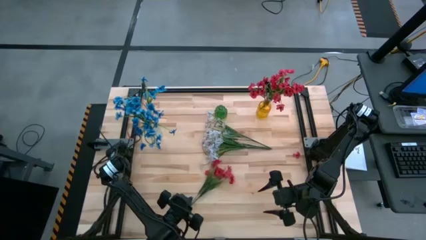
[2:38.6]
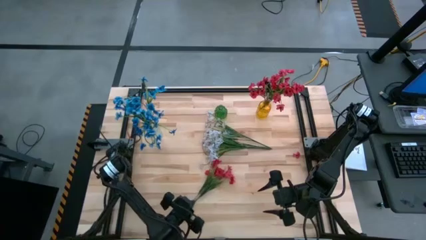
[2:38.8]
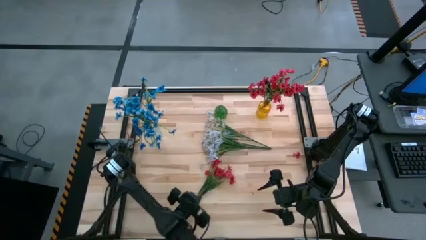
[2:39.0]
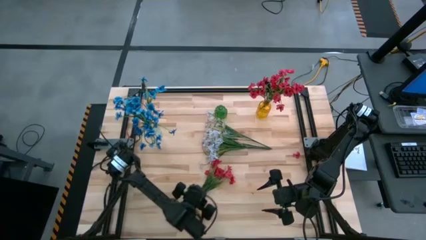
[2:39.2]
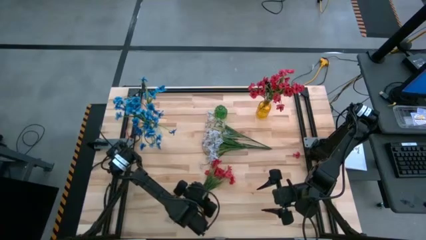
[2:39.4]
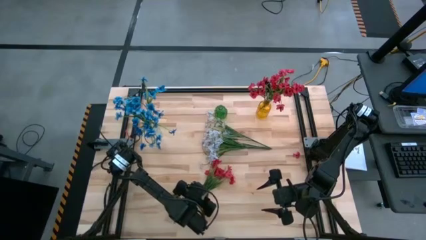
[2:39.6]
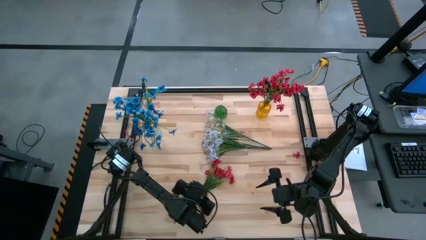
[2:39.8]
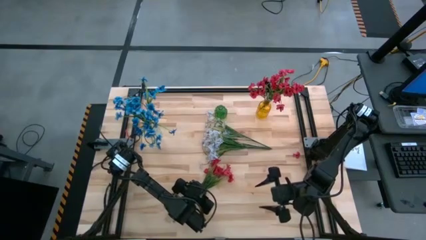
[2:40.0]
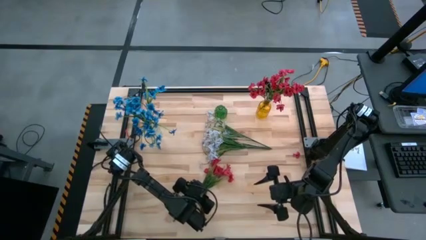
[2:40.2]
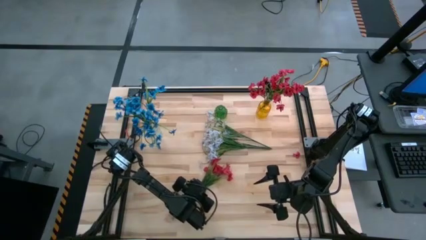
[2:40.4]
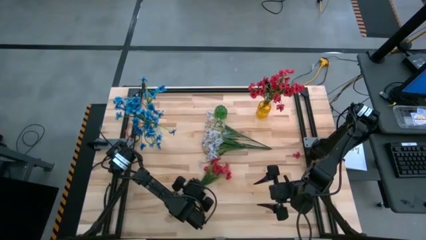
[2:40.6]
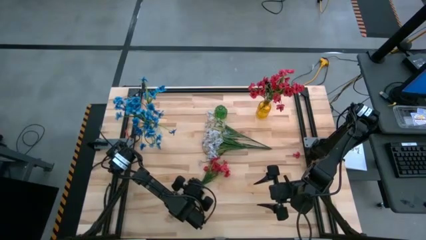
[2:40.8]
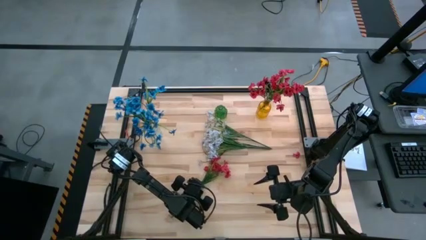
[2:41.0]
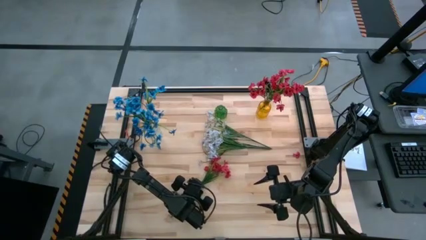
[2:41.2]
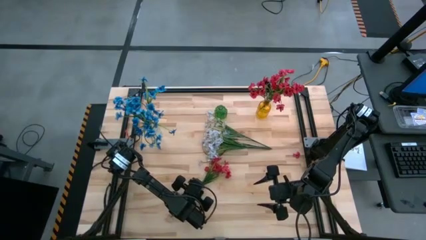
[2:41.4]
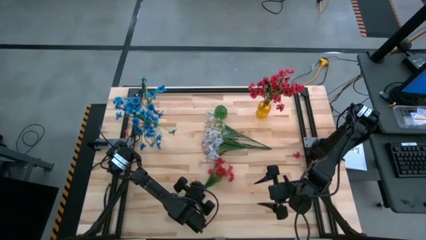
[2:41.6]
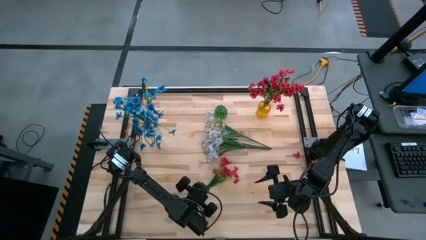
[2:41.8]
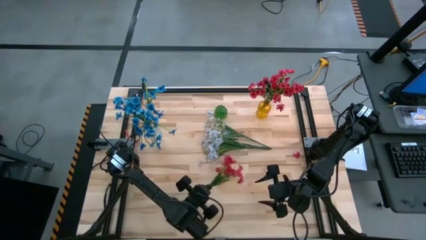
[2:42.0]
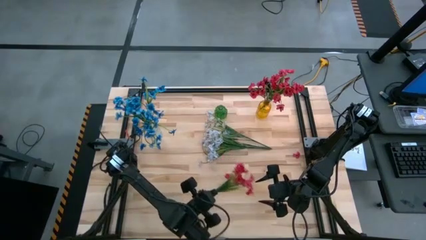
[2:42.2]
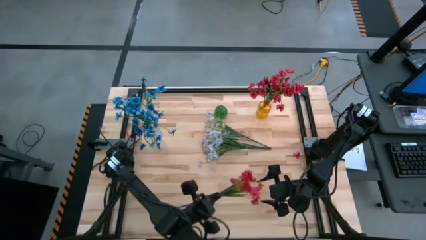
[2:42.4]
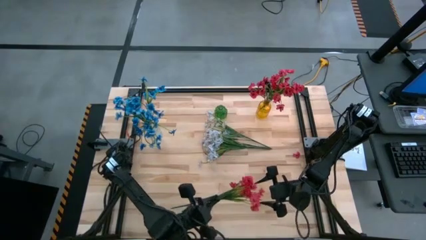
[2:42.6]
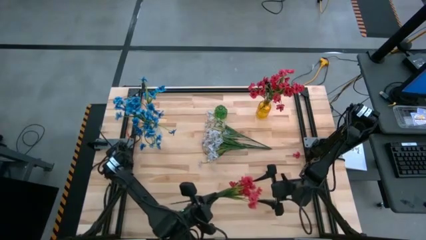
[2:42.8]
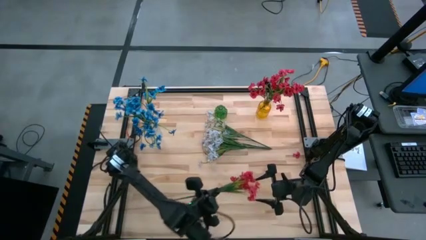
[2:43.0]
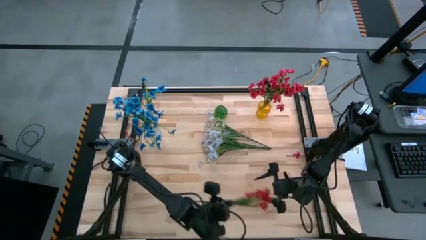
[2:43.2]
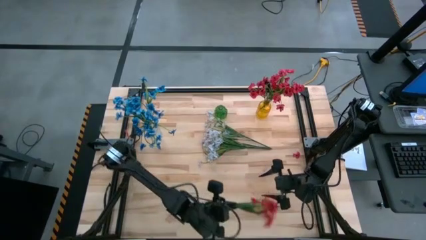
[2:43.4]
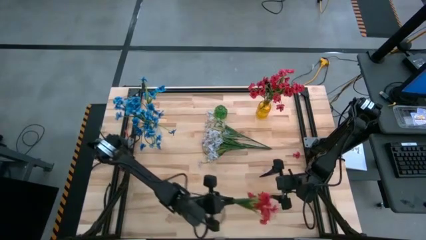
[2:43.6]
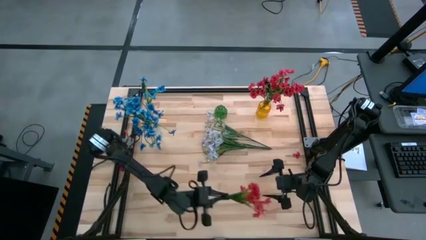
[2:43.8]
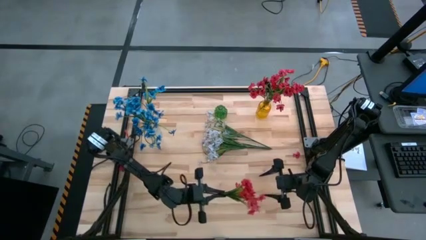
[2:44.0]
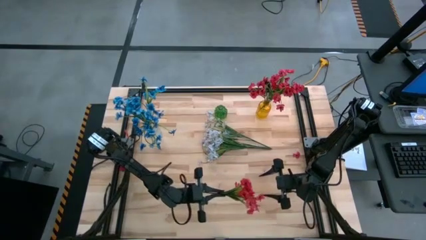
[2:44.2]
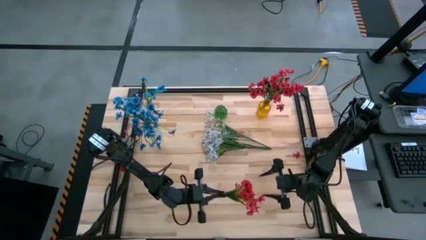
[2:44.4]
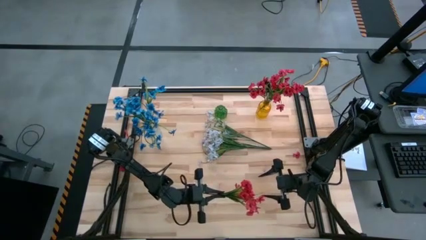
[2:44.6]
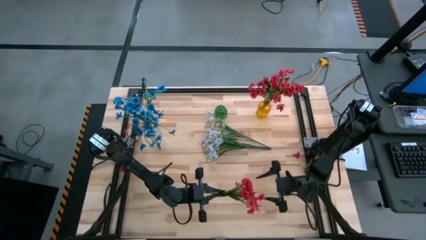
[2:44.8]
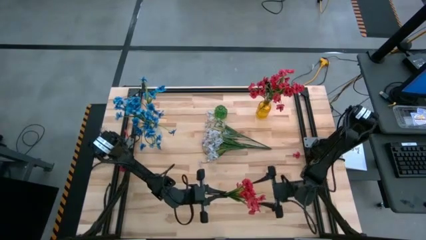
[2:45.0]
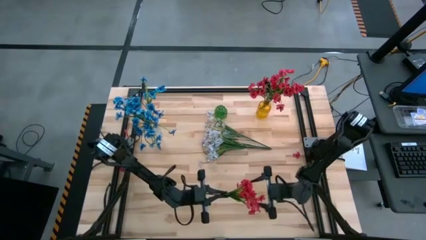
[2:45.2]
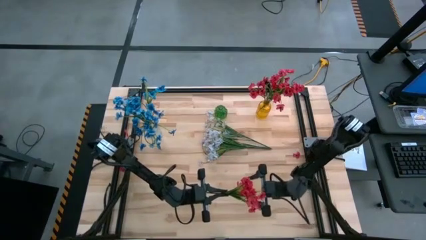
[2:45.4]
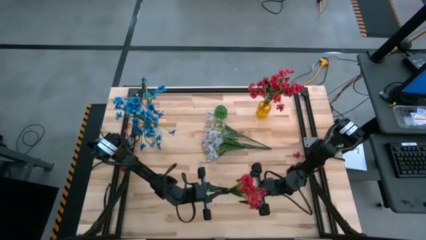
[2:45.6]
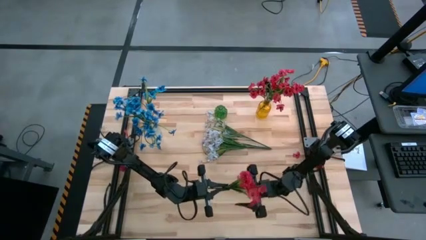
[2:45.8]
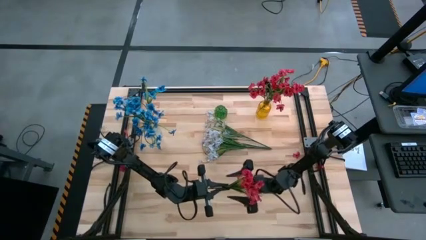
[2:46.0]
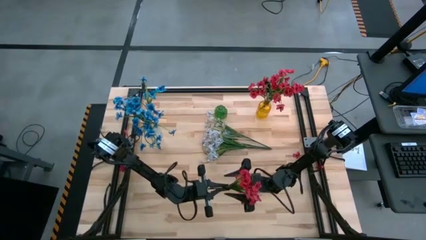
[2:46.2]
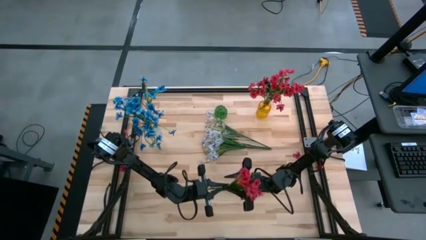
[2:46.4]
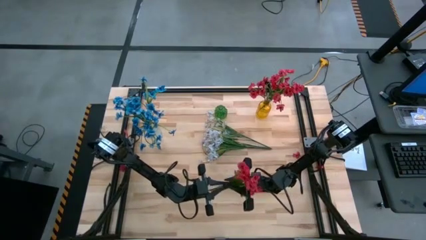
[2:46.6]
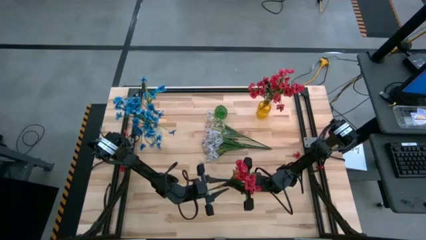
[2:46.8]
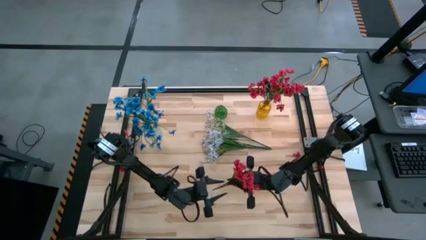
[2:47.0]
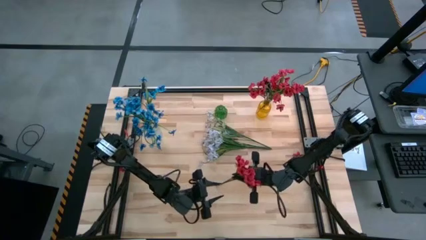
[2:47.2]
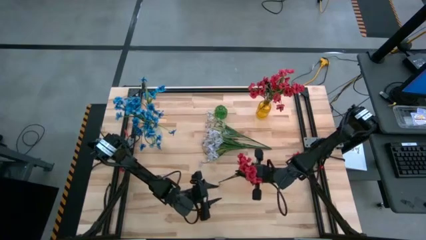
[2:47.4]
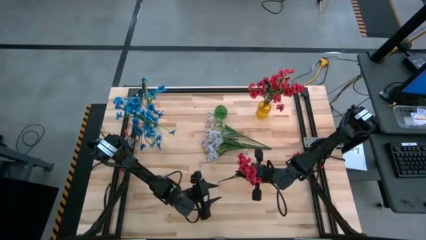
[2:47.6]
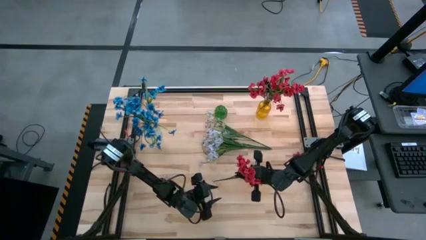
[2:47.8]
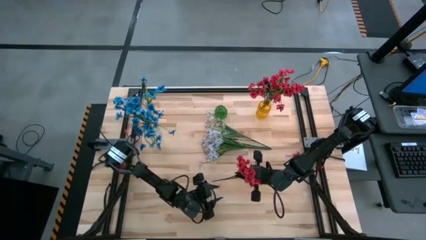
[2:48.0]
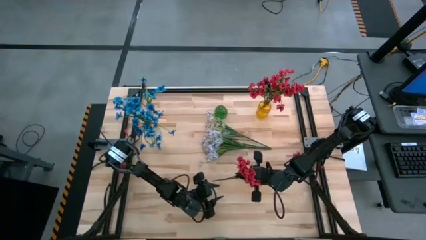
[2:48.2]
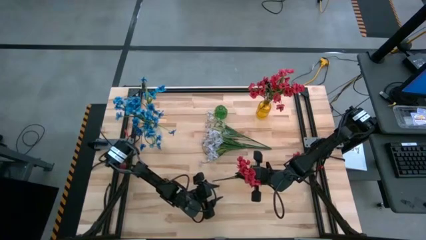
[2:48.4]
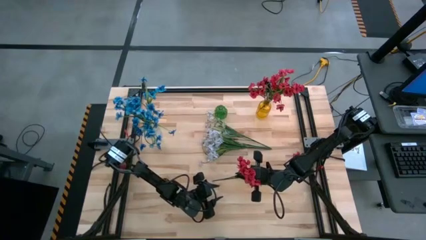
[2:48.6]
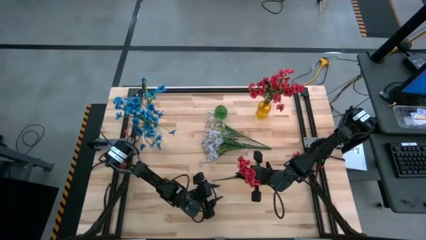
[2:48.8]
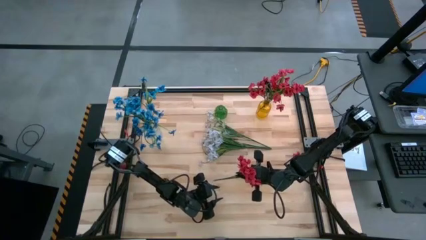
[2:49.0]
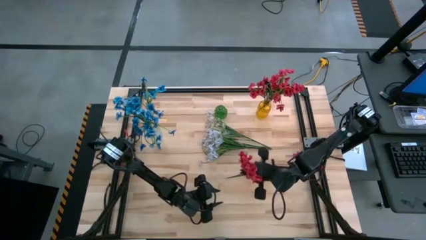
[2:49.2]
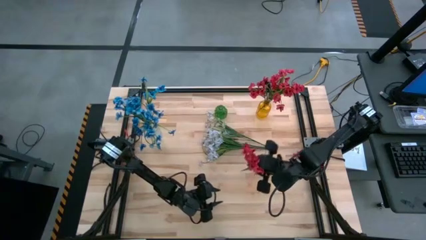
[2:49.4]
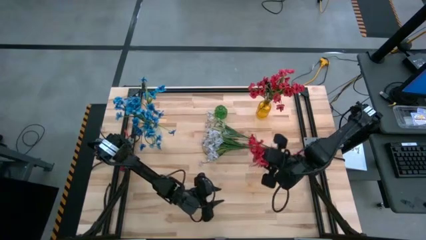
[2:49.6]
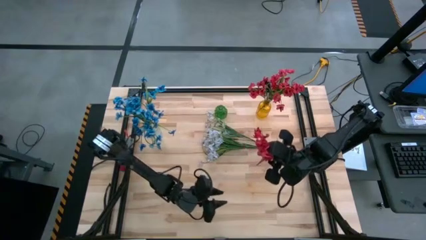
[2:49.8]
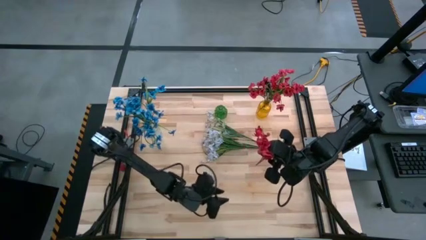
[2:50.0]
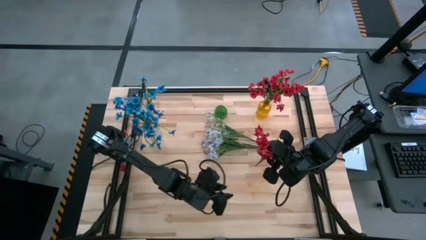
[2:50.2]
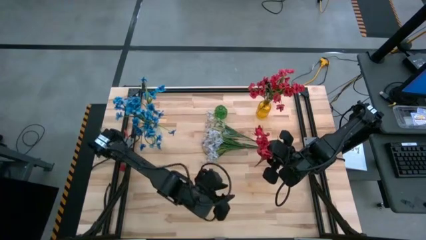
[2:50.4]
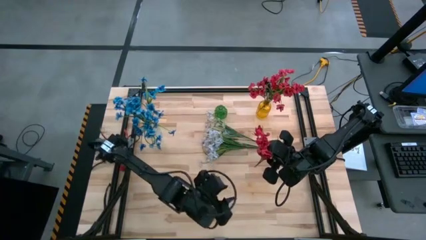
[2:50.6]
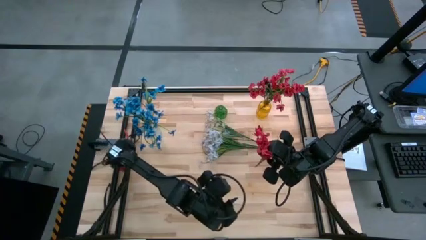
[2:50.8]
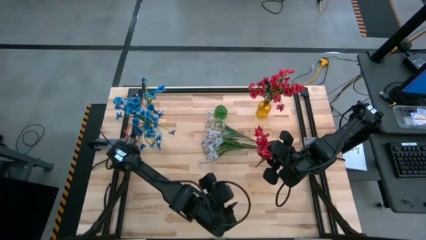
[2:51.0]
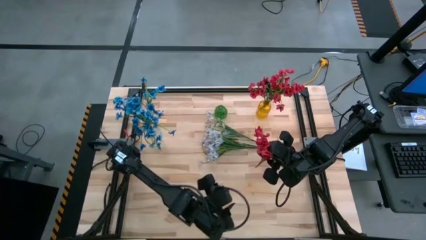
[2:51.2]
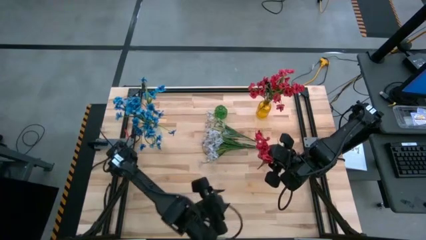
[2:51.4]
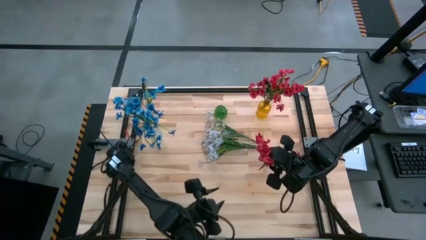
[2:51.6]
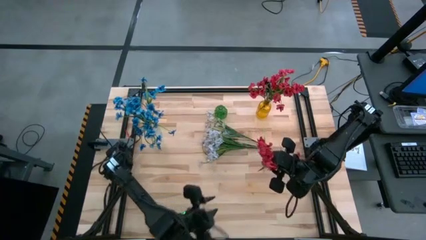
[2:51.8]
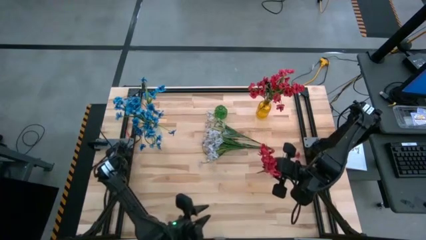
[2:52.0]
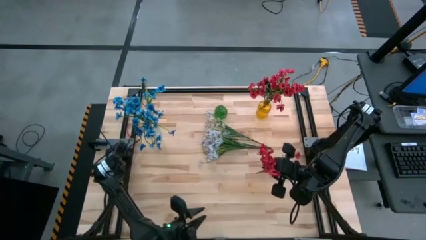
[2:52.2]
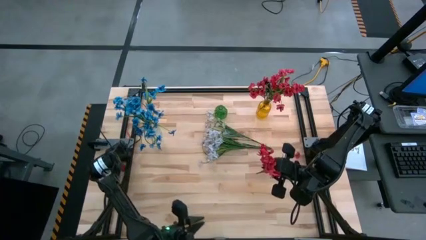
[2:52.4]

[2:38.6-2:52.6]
Task: Sort flowers into vase by color
Put the red flowers into the yellow vase

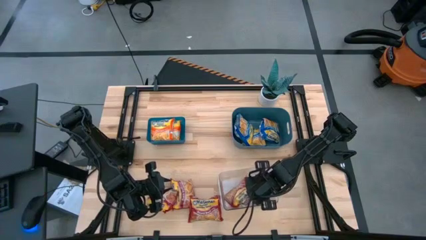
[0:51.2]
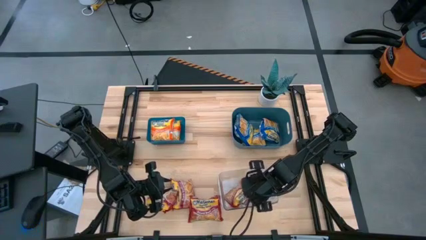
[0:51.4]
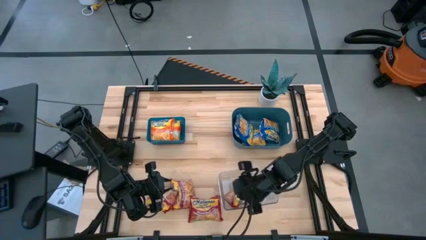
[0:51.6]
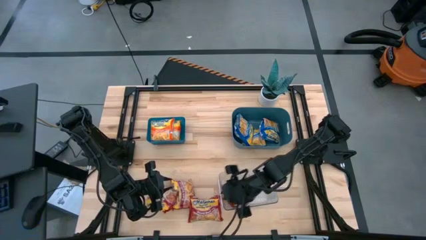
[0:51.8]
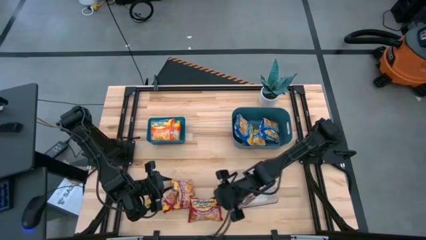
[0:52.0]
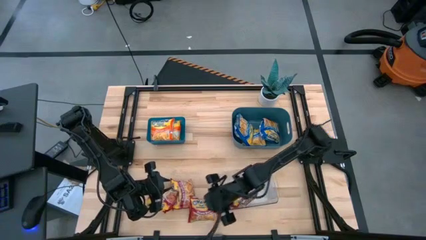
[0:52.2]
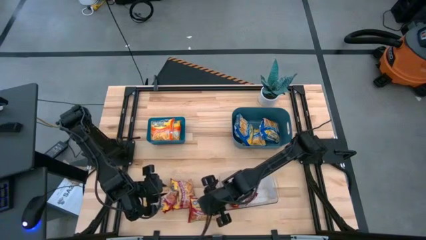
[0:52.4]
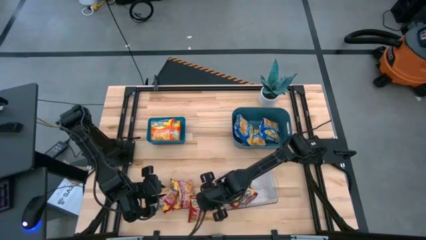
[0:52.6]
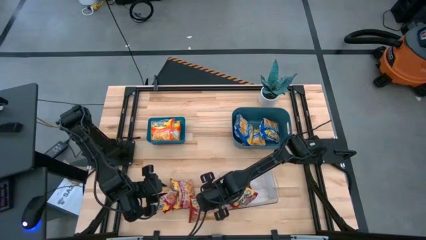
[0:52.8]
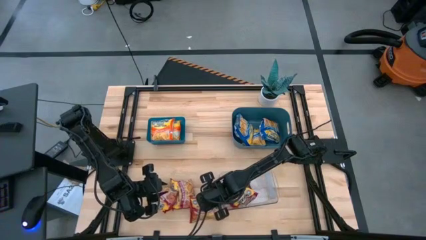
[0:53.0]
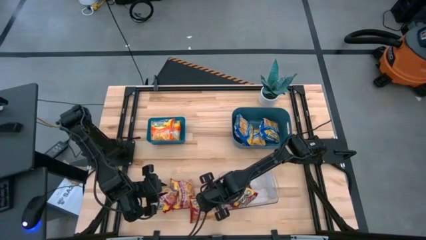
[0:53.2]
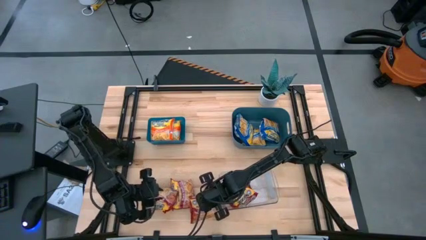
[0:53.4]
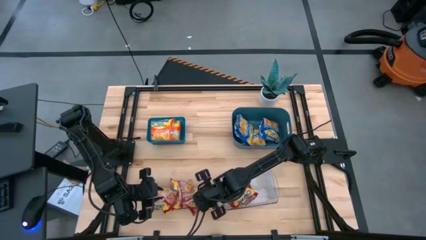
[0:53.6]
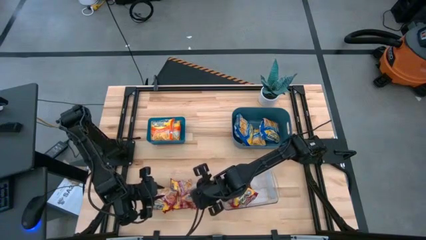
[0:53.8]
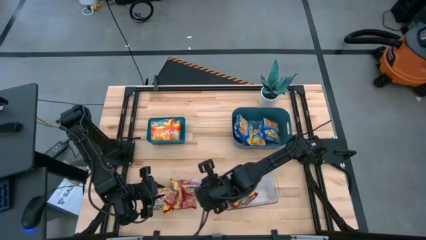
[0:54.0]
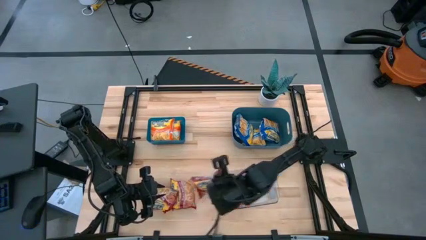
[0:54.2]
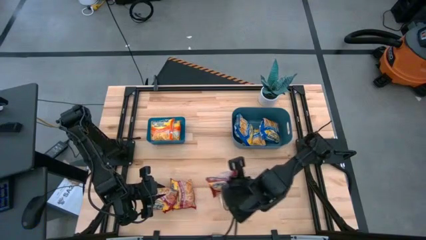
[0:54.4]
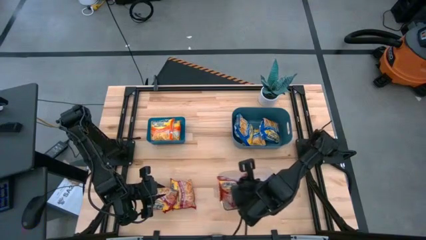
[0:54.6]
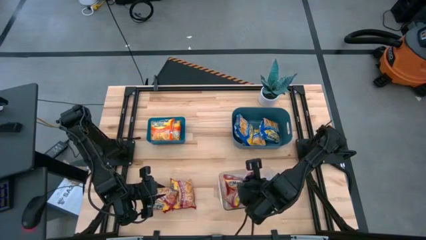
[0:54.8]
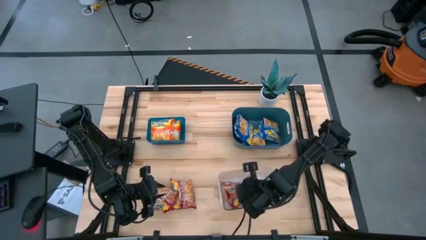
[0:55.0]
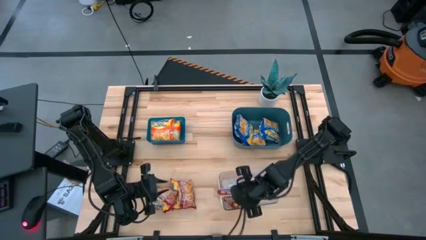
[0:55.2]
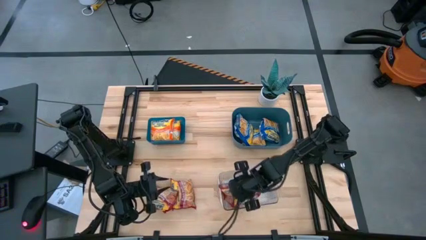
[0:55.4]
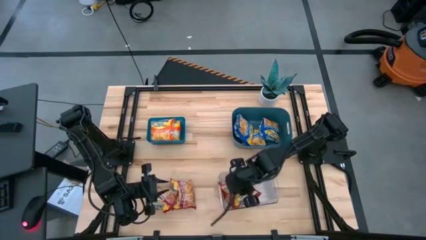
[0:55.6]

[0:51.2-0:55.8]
Task: Sort Maruchan noodles
Put the red noodle pack into the transparent bin
